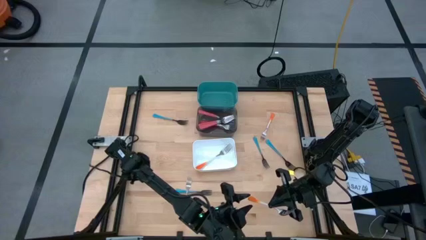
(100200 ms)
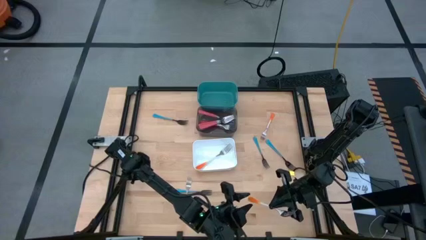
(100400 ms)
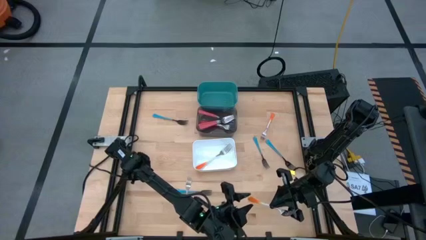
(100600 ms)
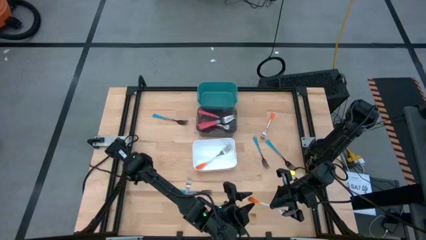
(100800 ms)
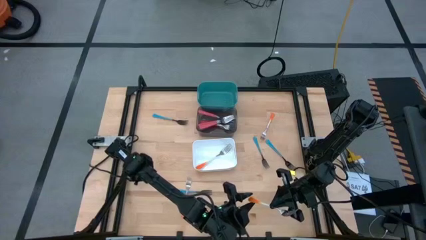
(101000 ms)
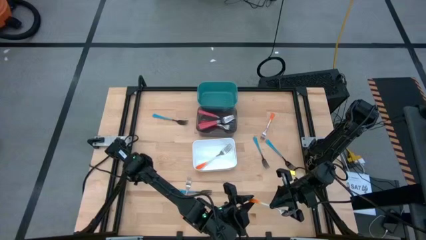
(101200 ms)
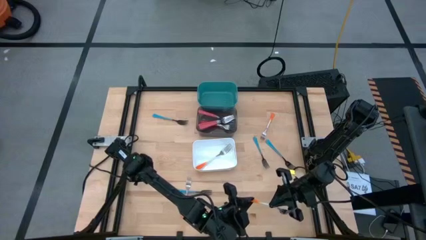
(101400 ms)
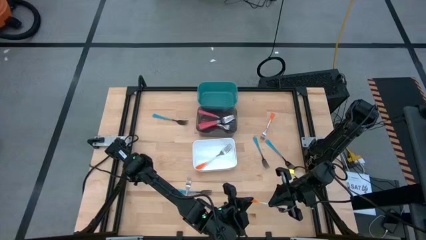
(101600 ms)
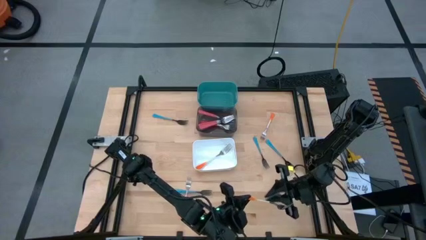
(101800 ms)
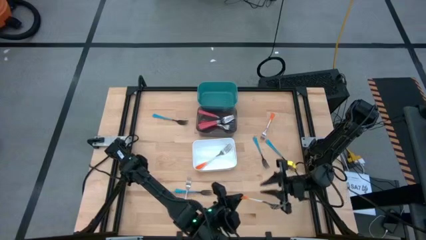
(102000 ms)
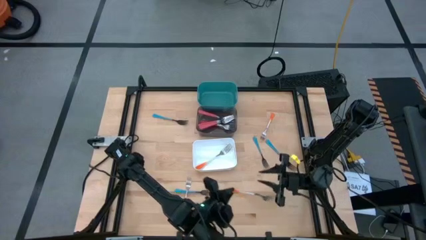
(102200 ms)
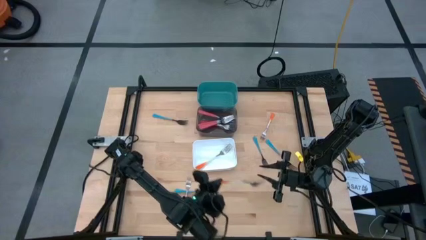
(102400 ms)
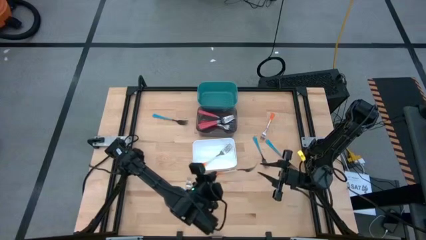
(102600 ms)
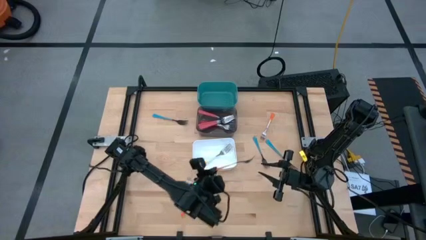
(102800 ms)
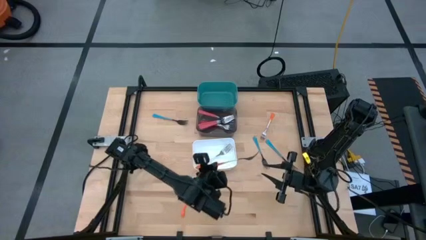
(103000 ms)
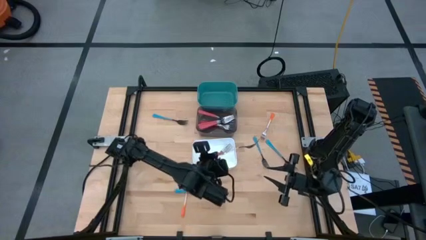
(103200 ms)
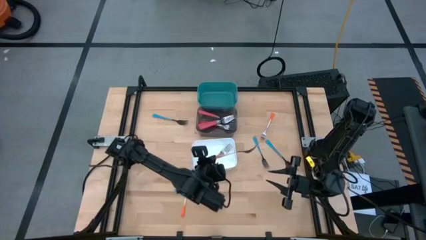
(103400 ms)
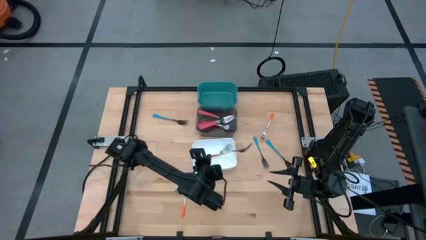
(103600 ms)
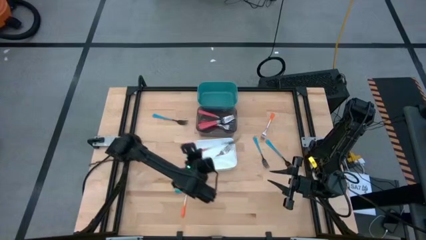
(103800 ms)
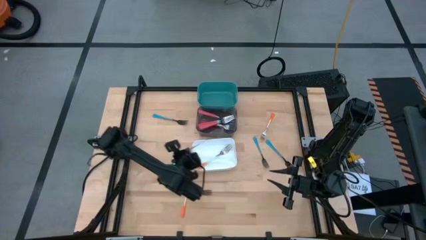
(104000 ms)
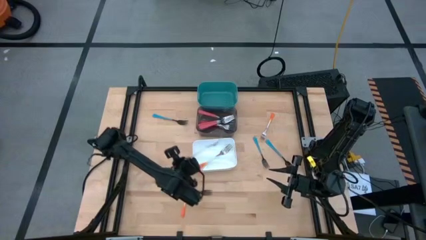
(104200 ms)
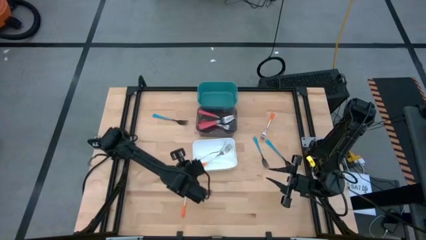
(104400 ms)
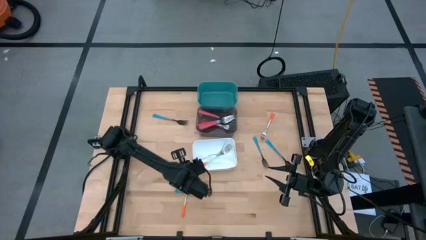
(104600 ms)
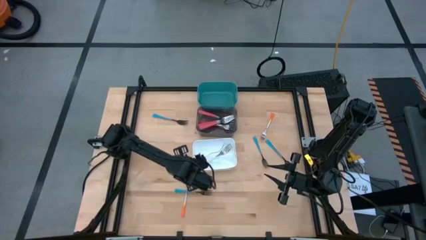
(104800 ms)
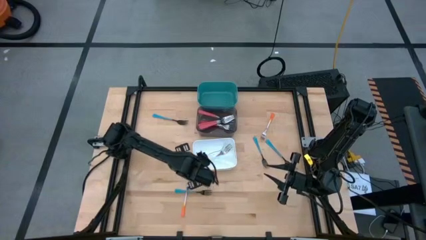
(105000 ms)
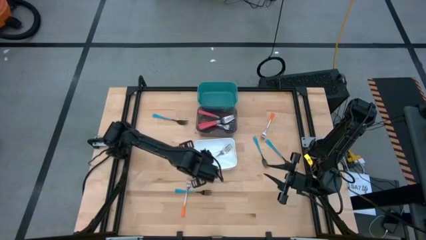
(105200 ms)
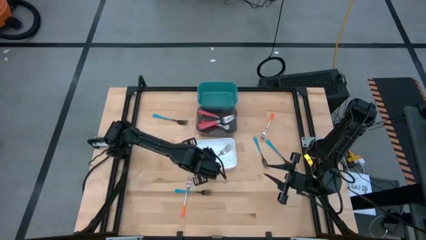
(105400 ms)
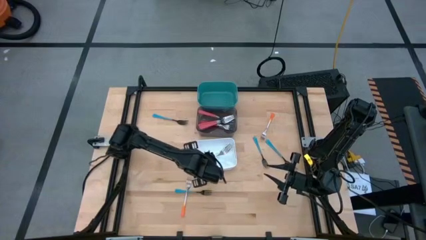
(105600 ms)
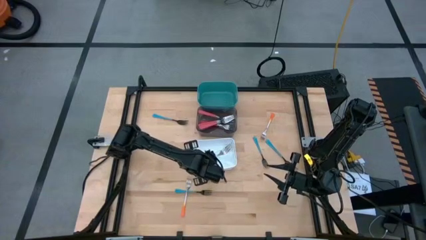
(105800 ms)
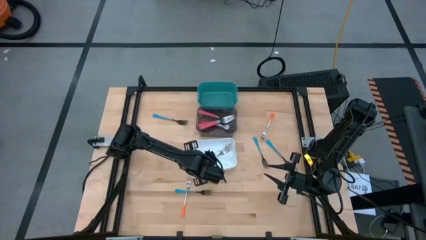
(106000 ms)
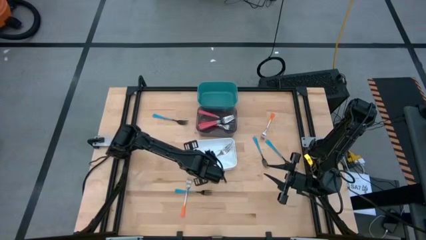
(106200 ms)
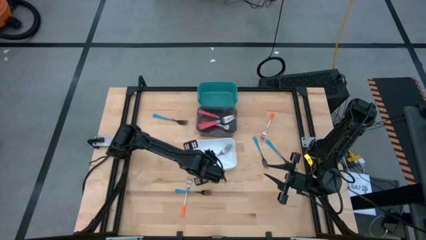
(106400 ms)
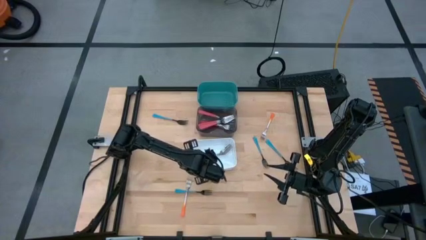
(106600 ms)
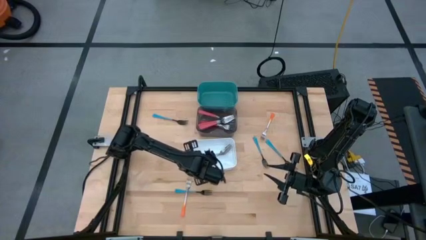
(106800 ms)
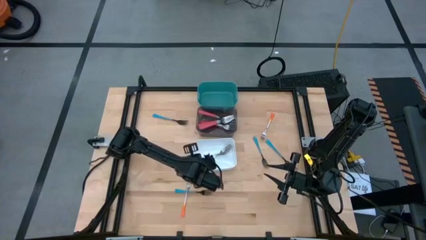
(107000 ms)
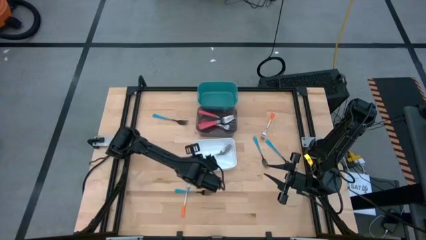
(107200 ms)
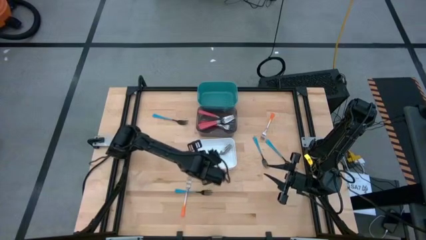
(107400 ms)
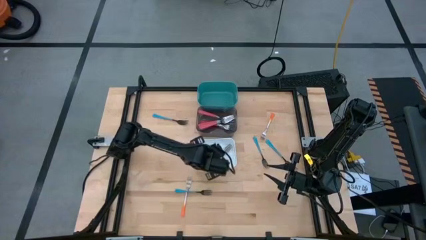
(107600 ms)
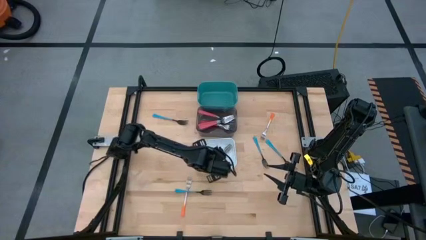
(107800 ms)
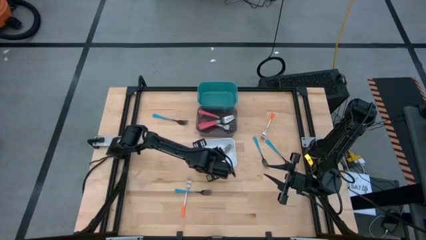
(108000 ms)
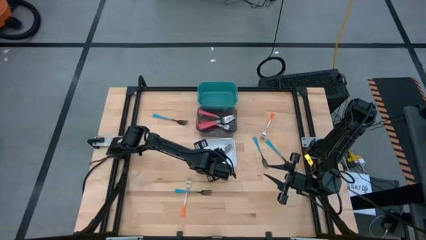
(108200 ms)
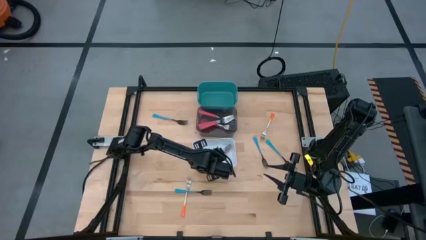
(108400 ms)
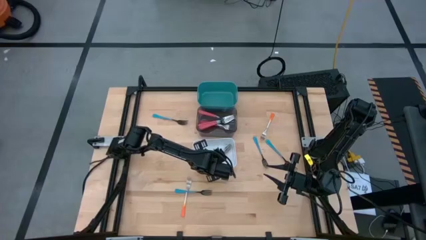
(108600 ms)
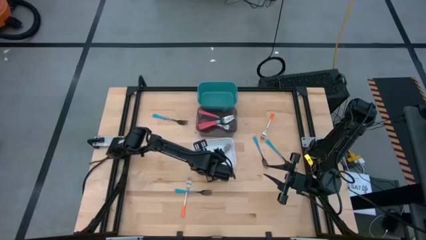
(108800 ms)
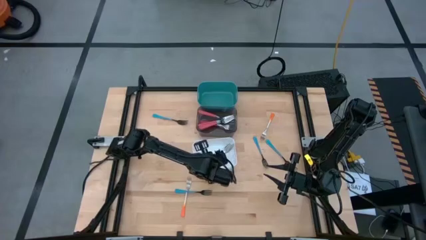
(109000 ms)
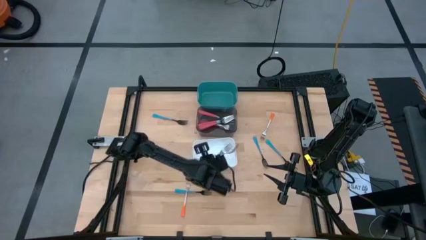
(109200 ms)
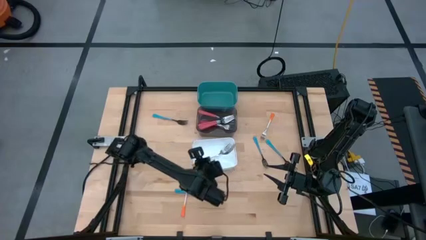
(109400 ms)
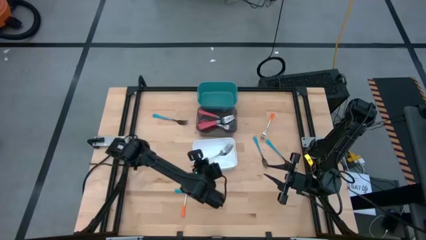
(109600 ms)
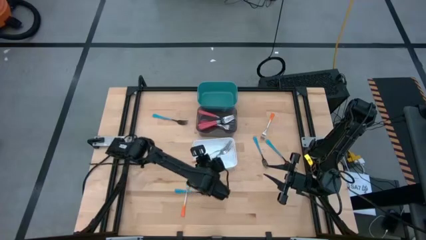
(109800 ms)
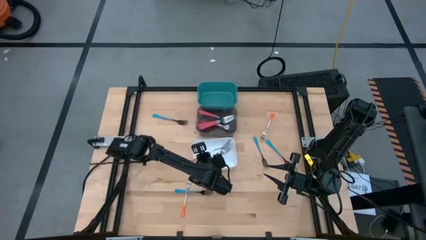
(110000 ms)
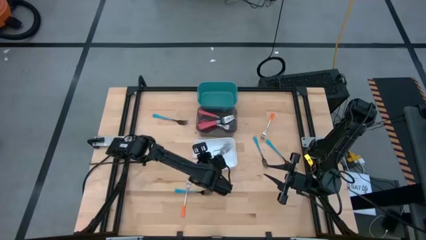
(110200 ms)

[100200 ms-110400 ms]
Task: Sort silverware by color (type)
Put the left orange fork into the white bin
